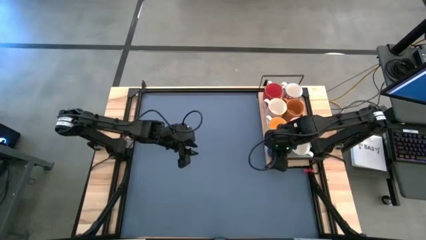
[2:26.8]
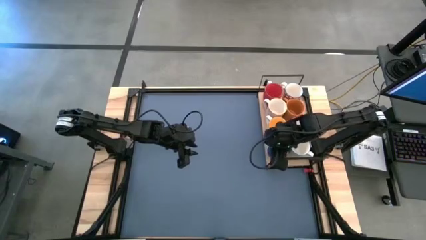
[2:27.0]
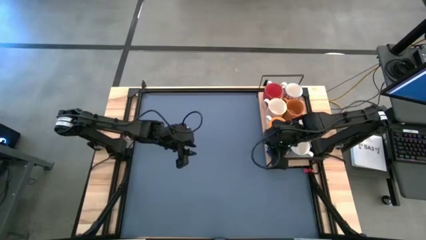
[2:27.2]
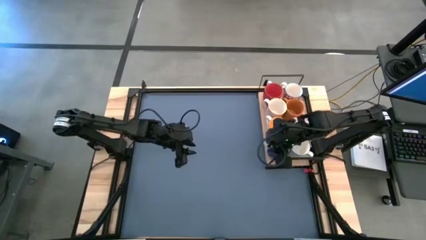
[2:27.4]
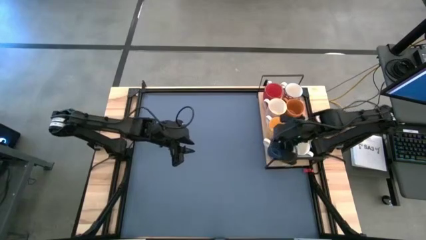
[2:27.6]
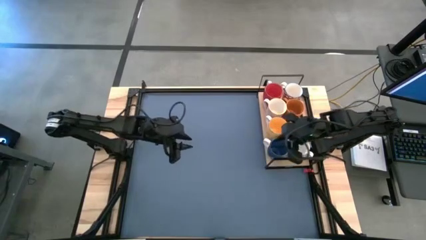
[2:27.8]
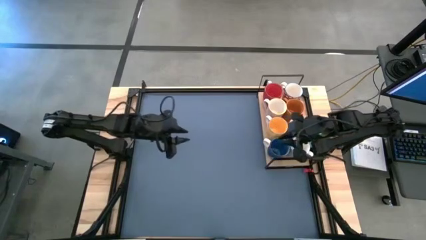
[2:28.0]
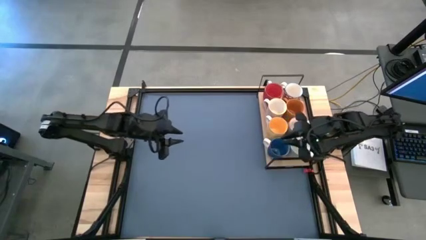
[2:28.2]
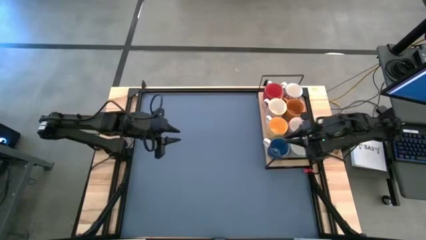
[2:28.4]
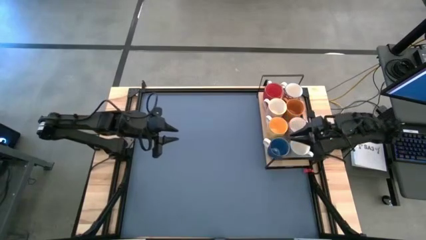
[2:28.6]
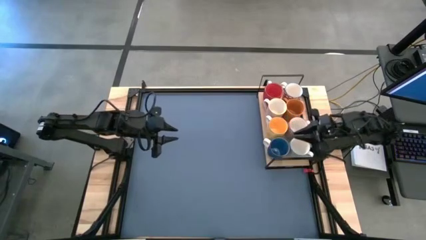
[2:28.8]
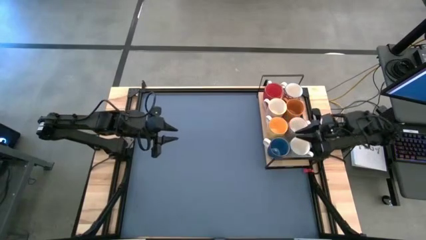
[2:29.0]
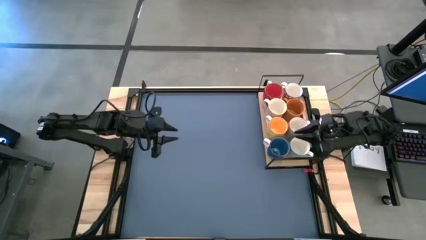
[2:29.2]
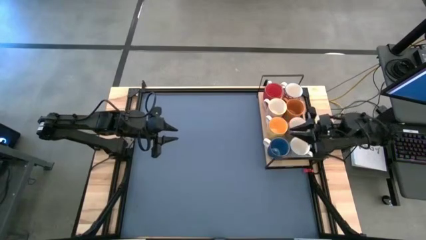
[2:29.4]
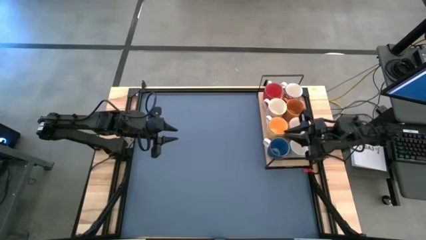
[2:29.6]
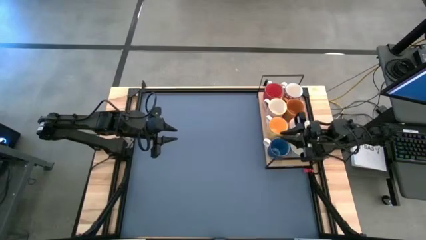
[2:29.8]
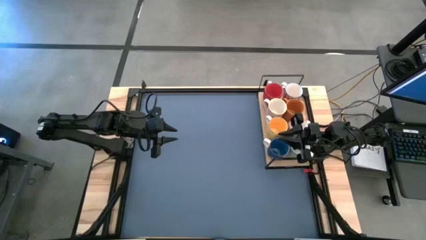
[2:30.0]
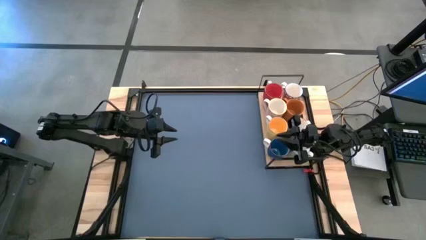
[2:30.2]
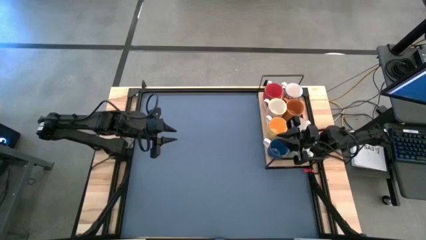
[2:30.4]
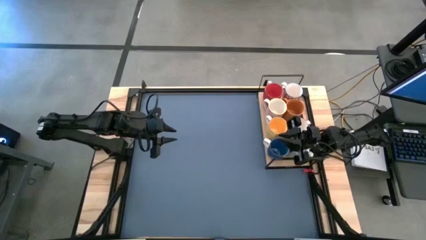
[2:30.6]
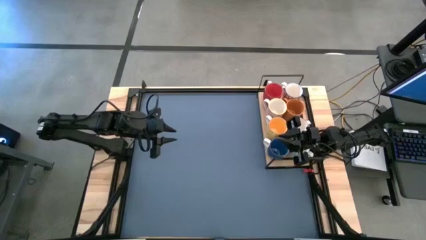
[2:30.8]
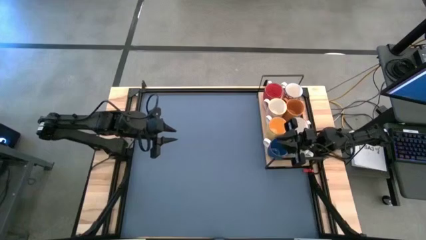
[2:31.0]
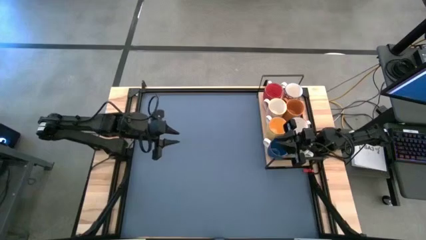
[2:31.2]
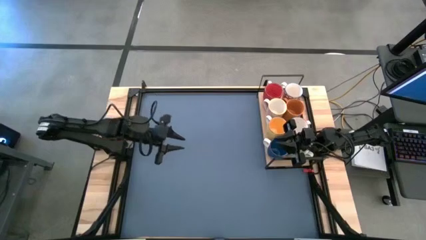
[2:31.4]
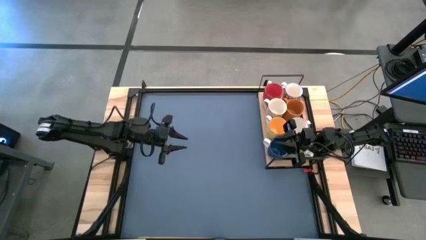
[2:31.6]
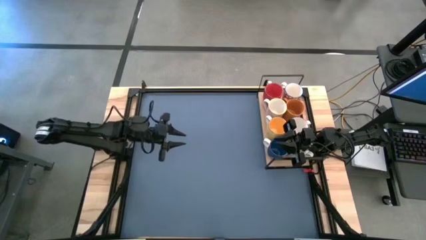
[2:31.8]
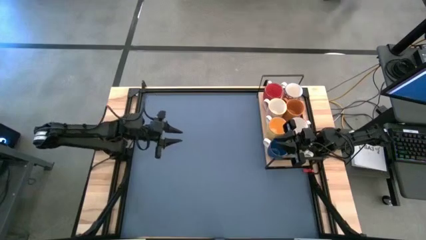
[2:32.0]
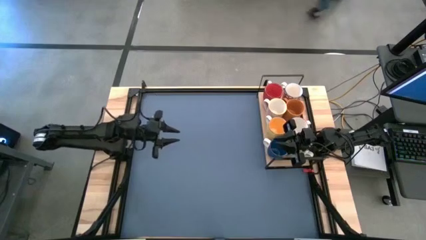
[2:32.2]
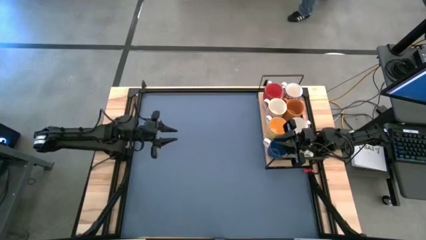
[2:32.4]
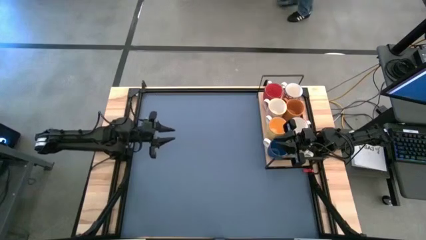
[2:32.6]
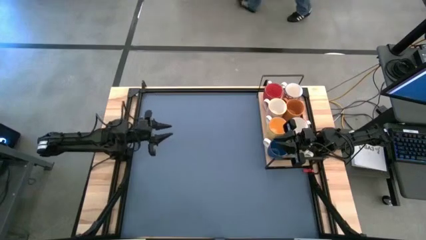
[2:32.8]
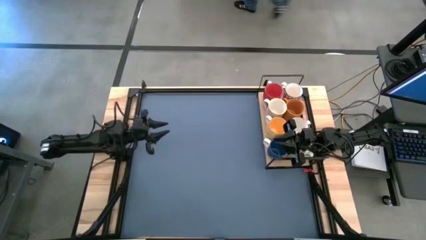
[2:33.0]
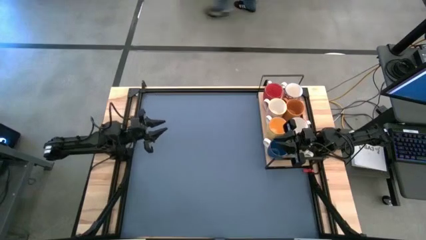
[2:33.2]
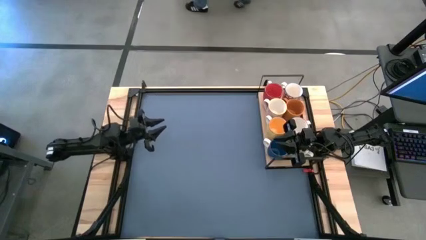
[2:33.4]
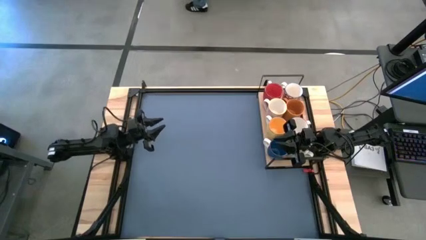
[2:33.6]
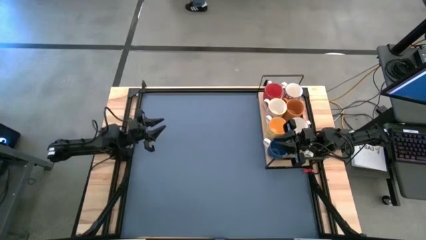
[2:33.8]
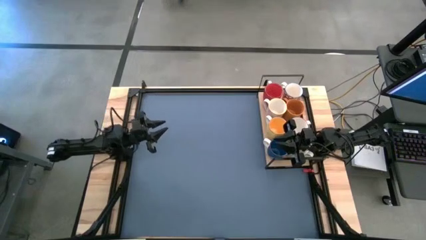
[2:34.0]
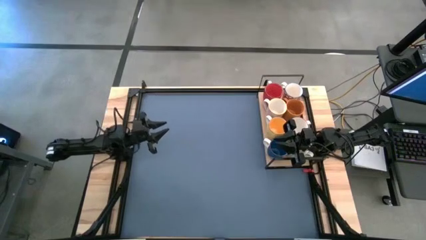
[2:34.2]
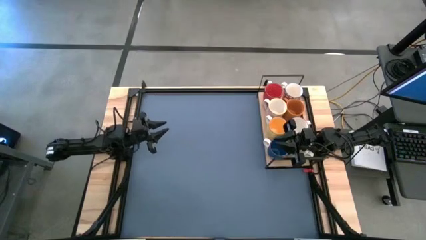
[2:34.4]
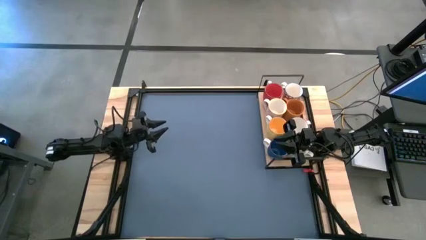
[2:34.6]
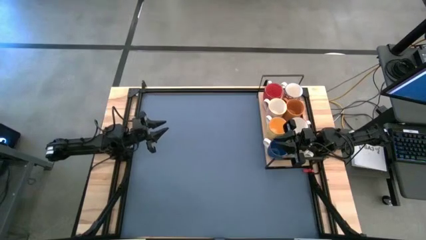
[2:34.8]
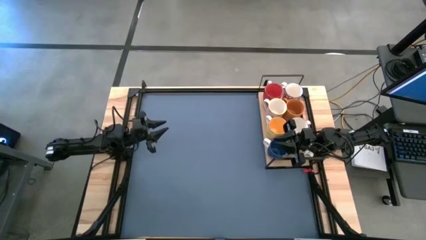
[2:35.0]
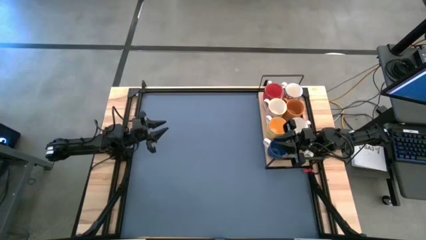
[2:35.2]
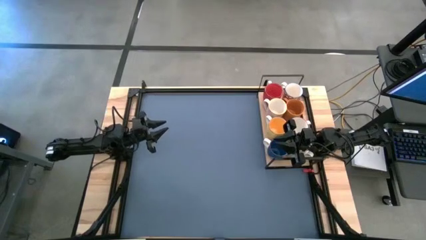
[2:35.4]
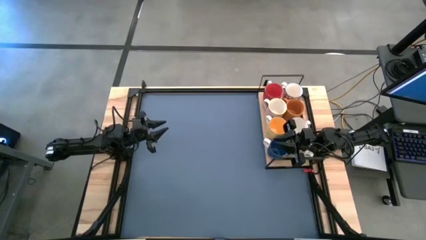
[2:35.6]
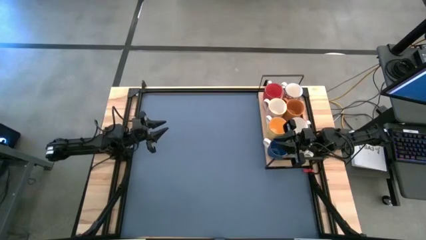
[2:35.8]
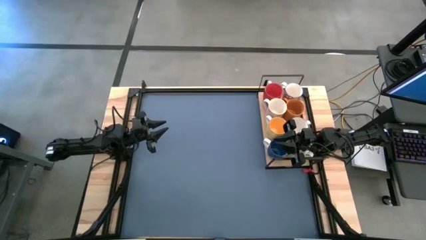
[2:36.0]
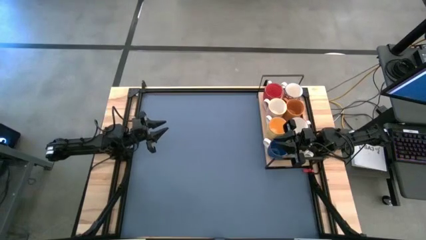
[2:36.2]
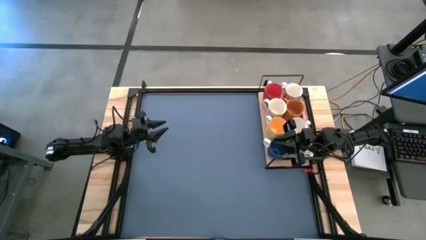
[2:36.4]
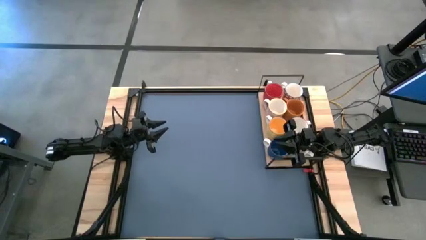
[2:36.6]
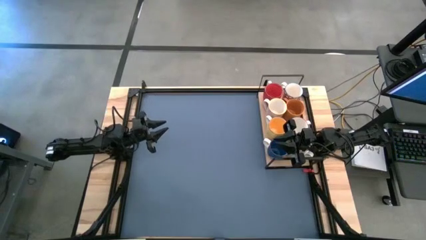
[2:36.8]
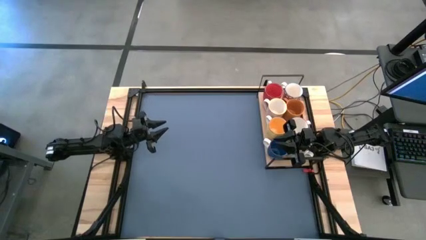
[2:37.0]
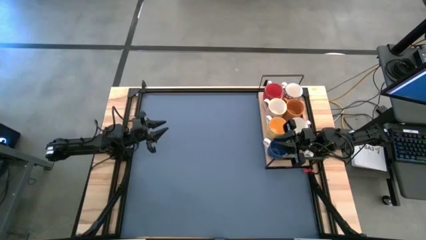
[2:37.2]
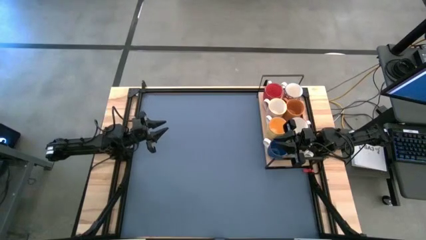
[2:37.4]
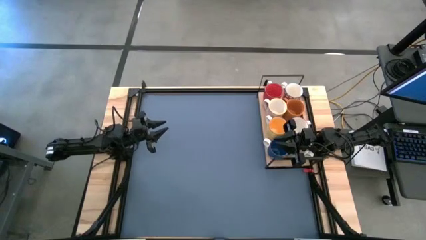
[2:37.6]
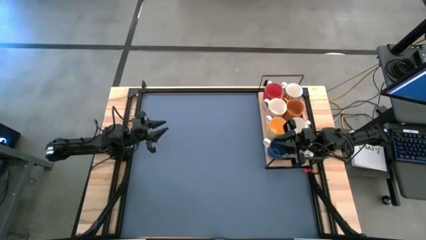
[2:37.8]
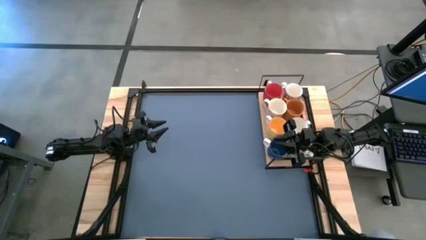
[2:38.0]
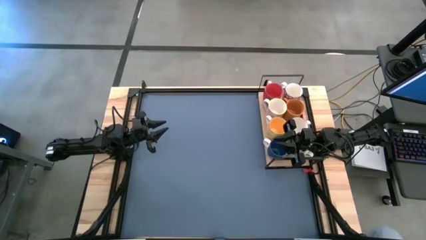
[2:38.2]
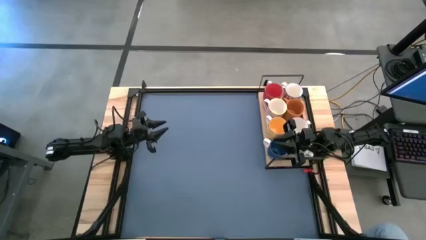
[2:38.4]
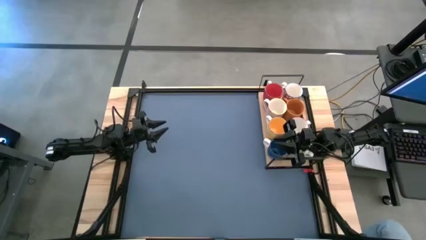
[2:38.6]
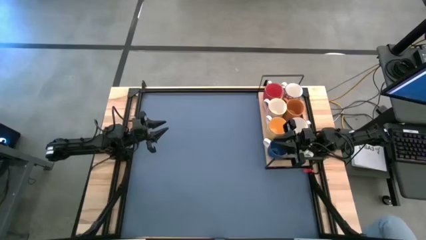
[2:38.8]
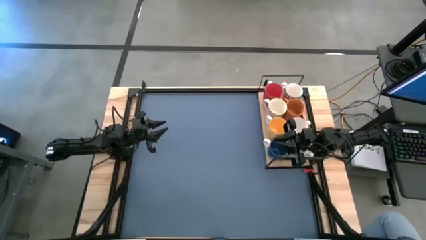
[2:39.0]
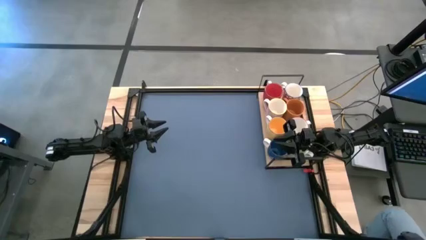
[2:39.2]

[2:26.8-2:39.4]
Task: Place coffee mugs
Return to Home Position

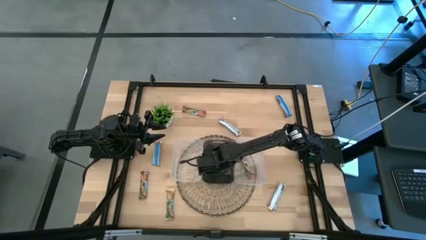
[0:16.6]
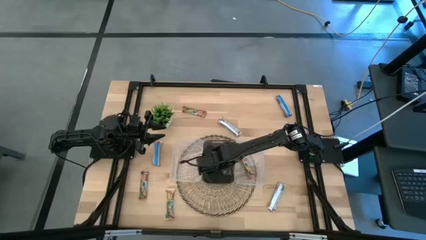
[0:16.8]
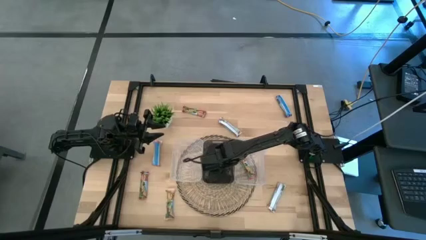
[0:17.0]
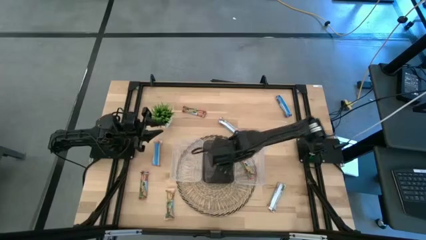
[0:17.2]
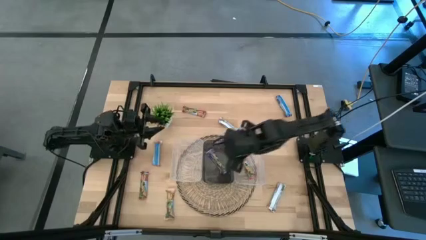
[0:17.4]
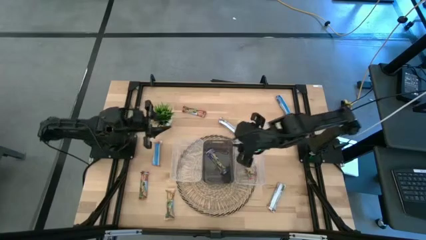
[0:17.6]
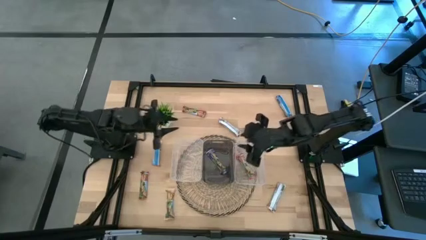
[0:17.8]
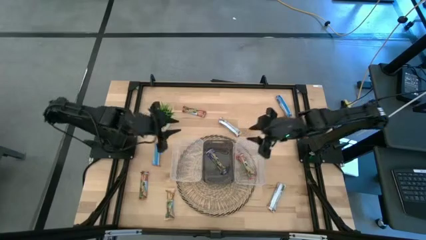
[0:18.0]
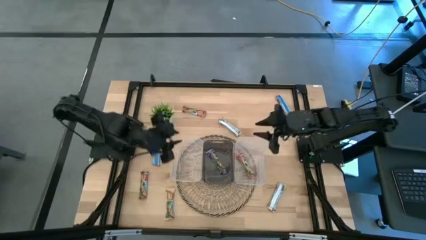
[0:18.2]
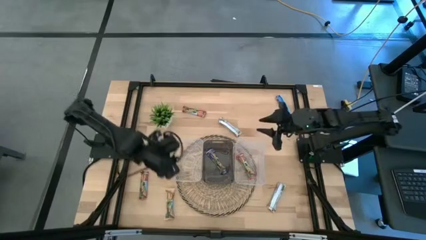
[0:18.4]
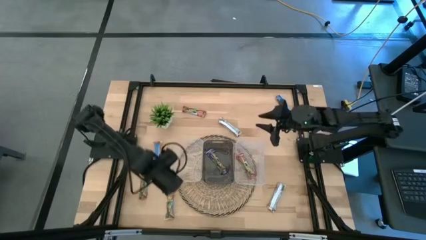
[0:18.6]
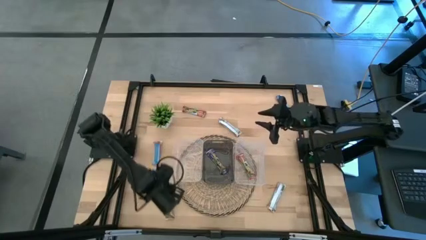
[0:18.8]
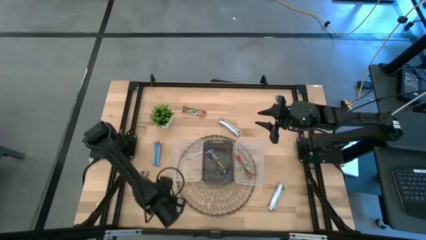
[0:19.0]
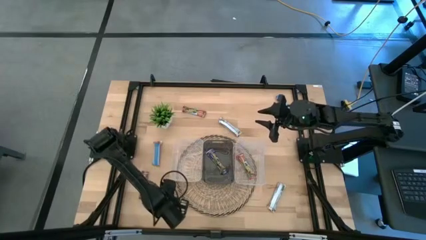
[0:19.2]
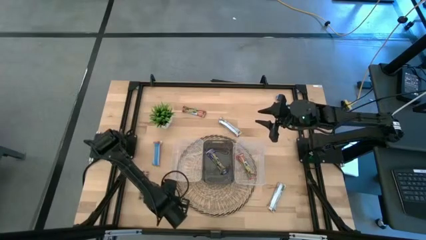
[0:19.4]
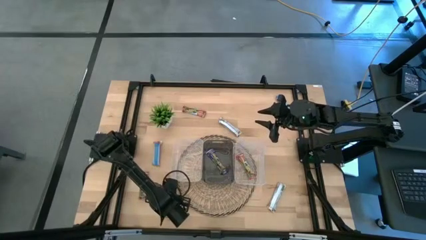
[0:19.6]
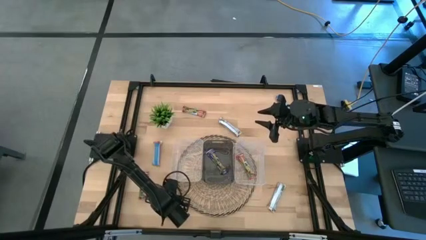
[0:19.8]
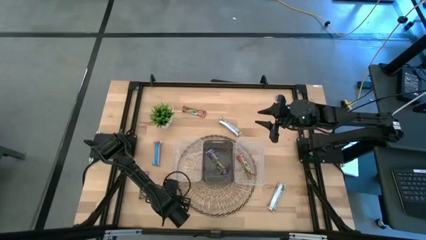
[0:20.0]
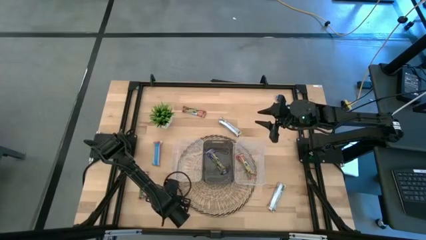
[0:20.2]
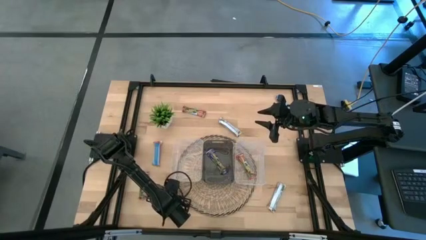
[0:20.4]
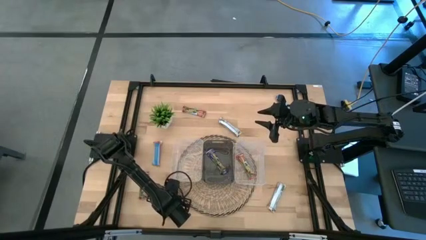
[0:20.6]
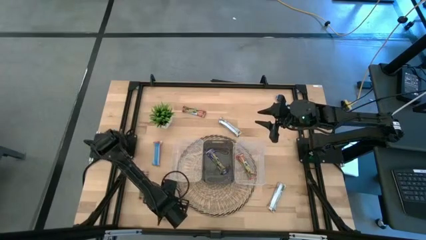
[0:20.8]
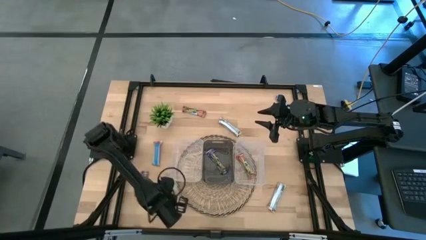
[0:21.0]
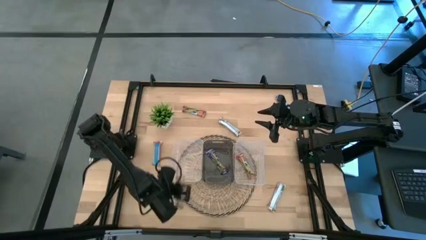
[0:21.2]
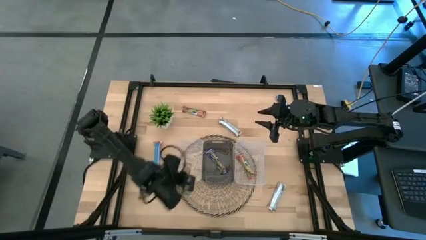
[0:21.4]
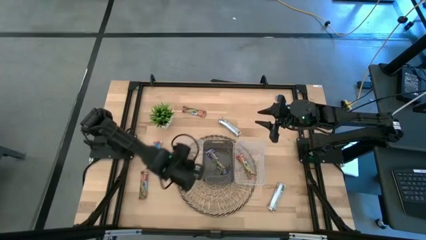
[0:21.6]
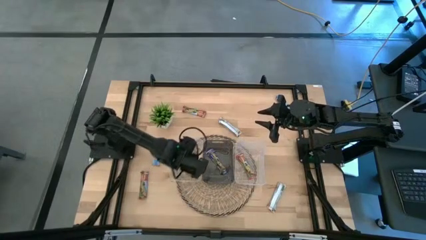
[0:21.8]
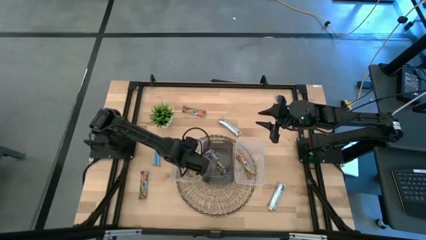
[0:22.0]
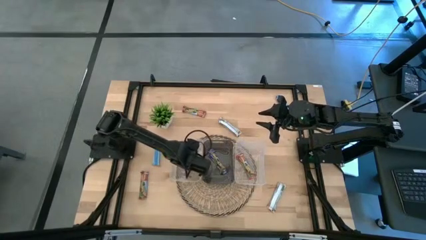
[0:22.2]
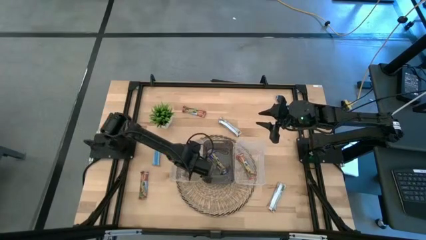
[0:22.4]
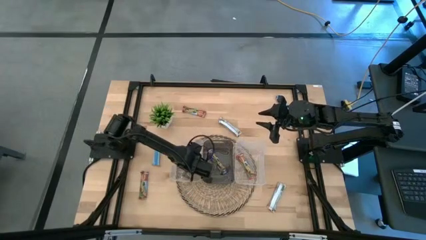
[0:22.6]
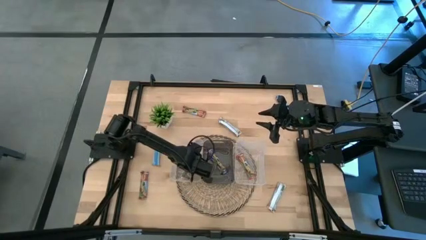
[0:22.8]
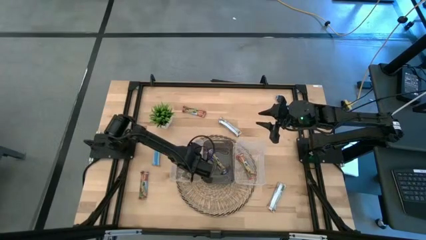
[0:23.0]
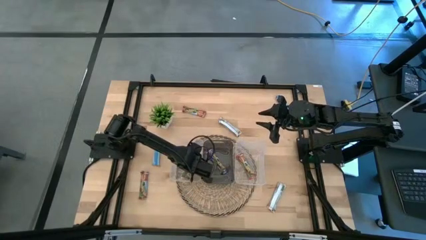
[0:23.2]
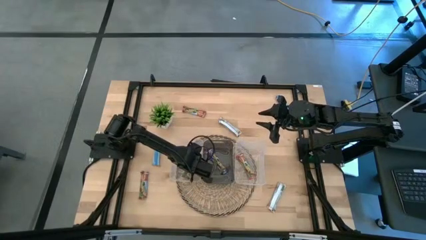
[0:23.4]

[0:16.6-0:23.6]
Task: Pick and place Granola Bars by type
Put the yellow granola bar into the left transparent bin
